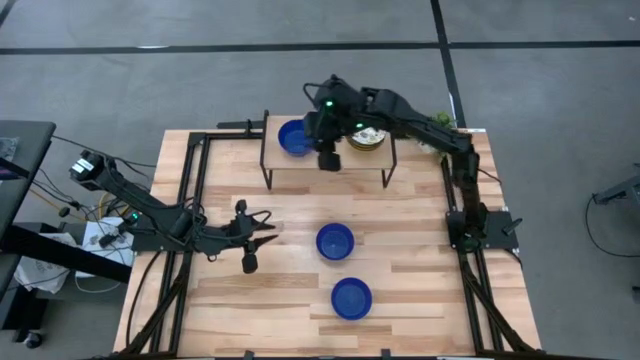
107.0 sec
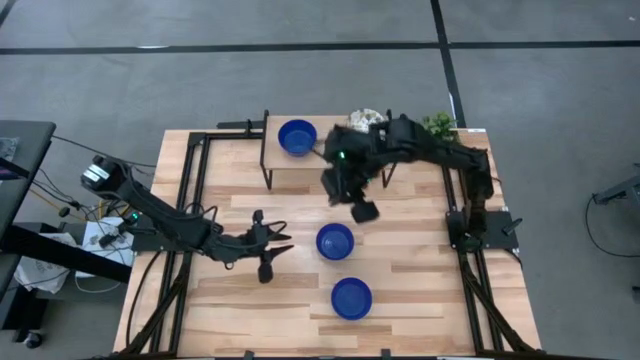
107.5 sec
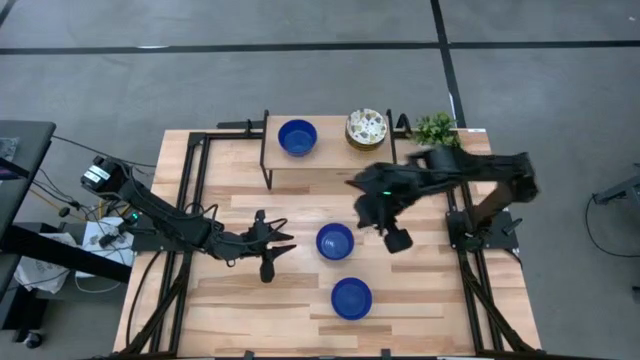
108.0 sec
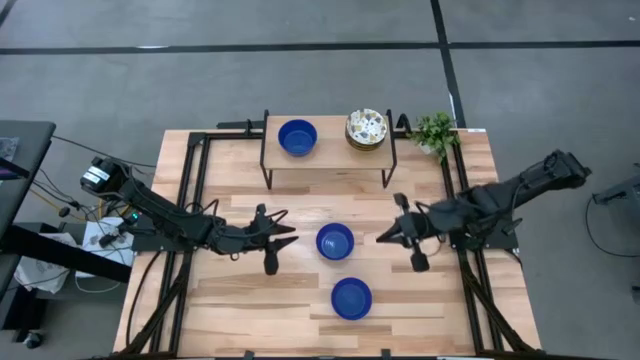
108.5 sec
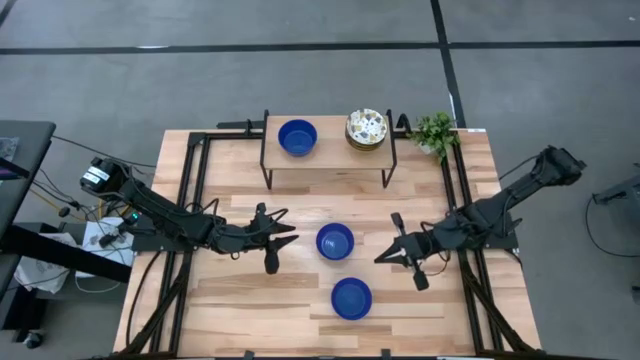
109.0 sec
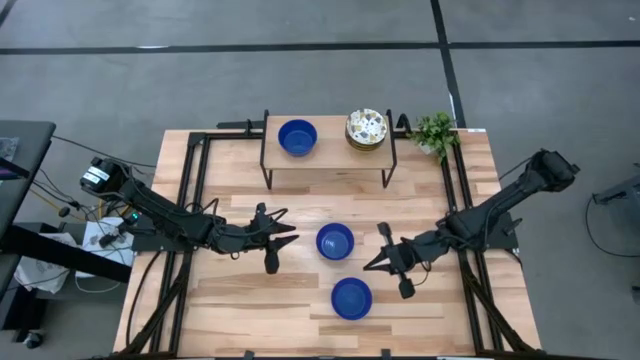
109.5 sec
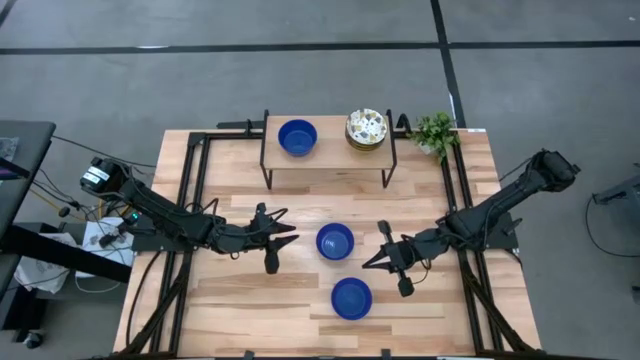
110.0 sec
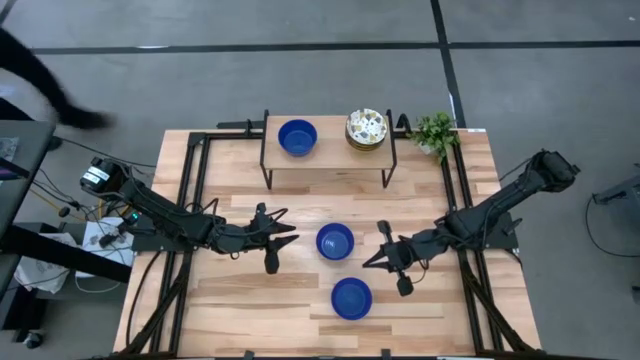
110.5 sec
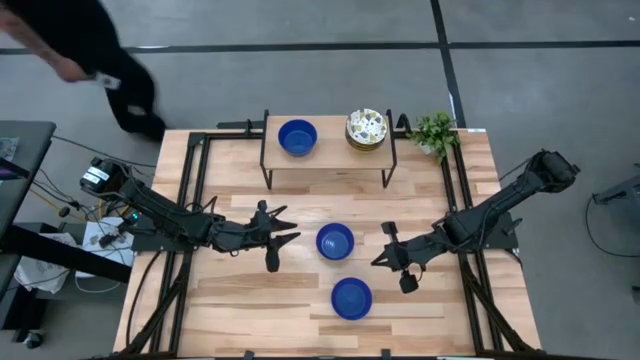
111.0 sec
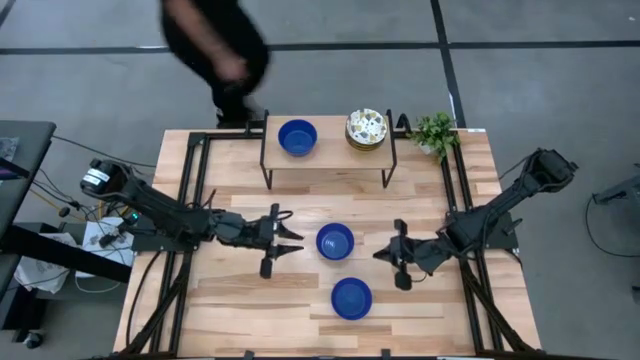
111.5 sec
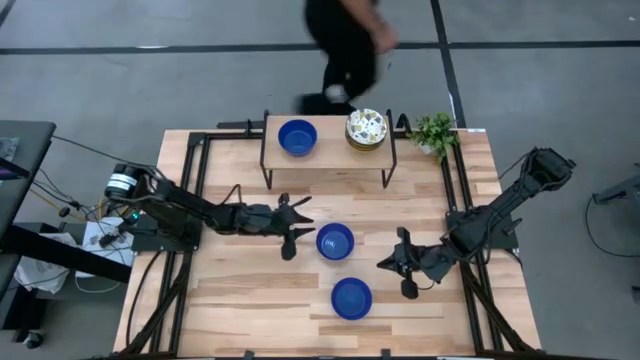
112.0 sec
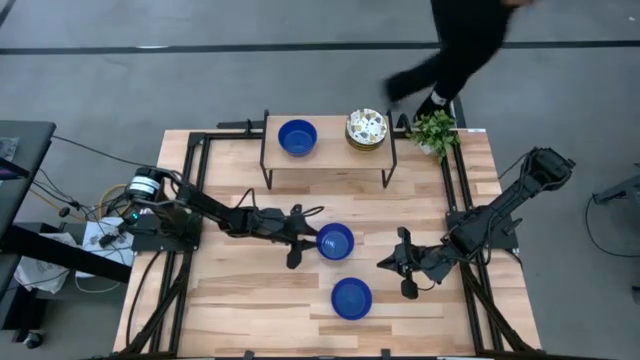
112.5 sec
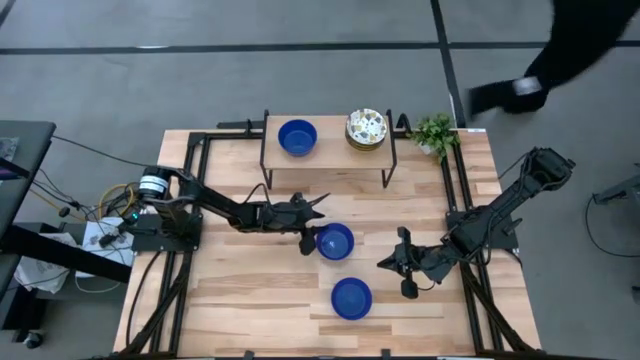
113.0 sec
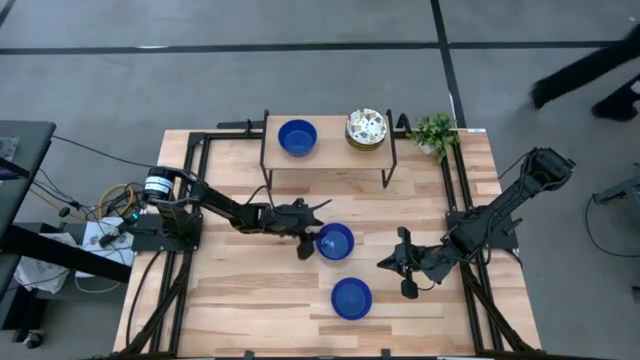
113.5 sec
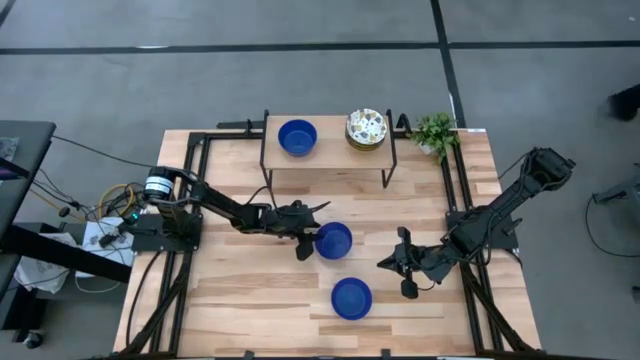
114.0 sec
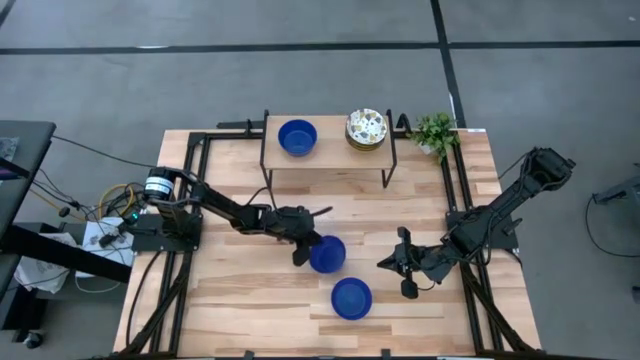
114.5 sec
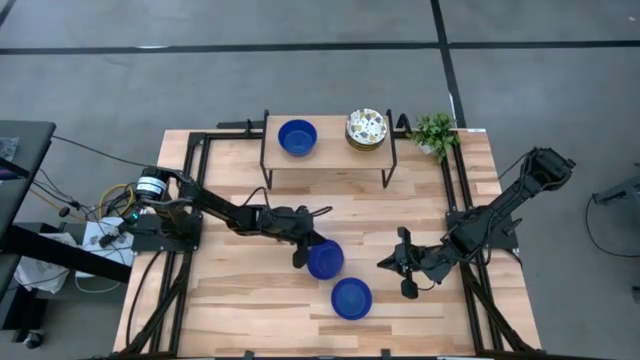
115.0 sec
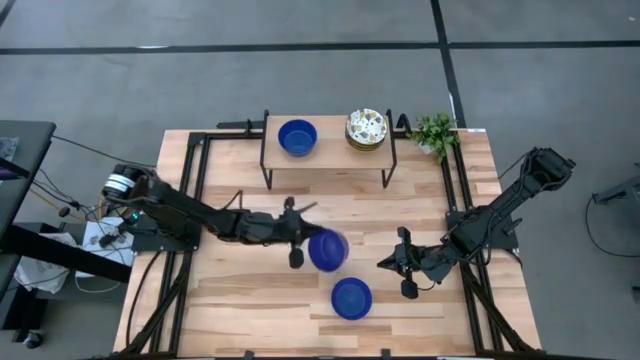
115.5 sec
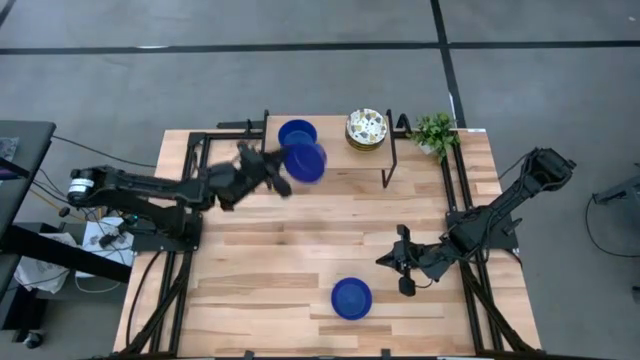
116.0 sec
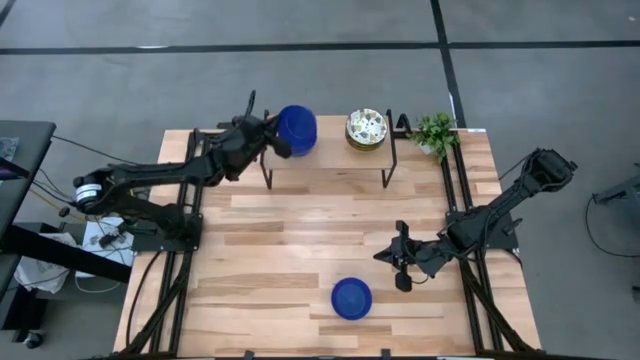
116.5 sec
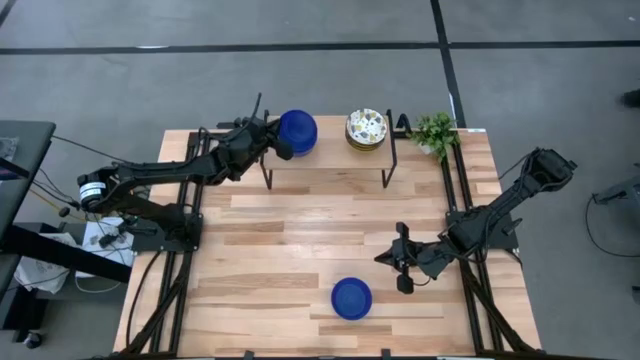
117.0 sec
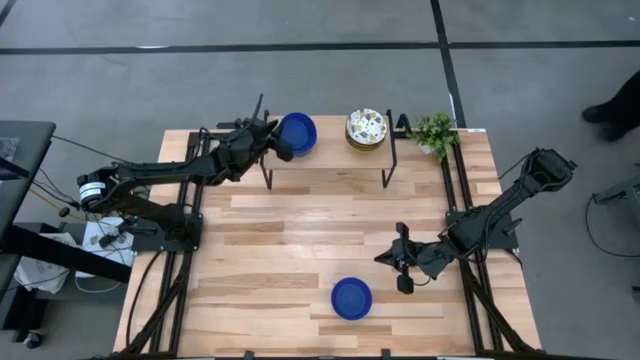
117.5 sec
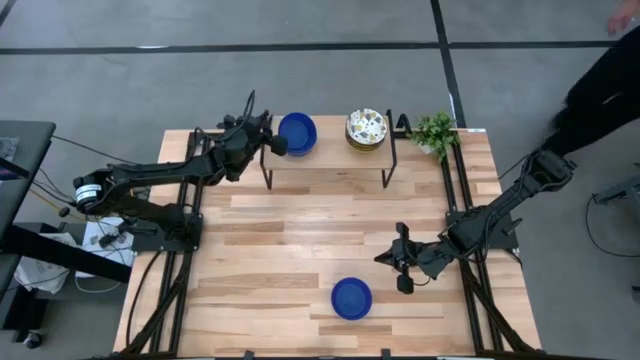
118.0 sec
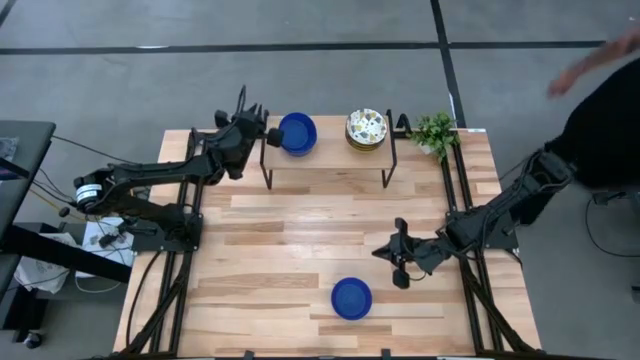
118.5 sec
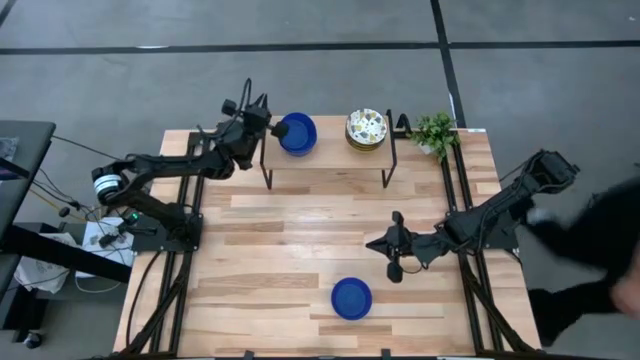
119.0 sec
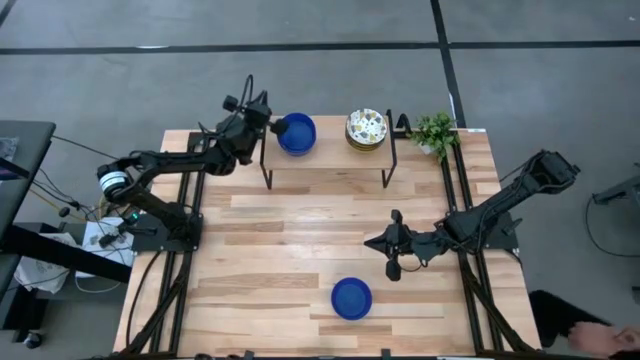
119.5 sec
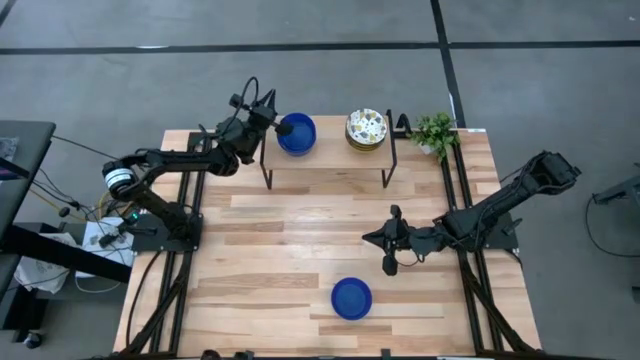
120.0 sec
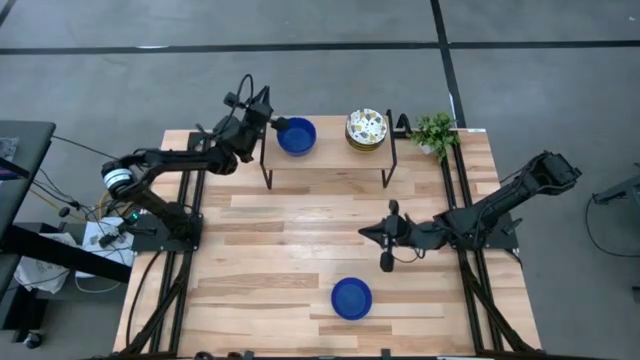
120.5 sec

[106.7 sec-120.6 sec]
Task: Pick & Place Mini bowls
Stack the blue bowl on top of the blue bowl on the shelf

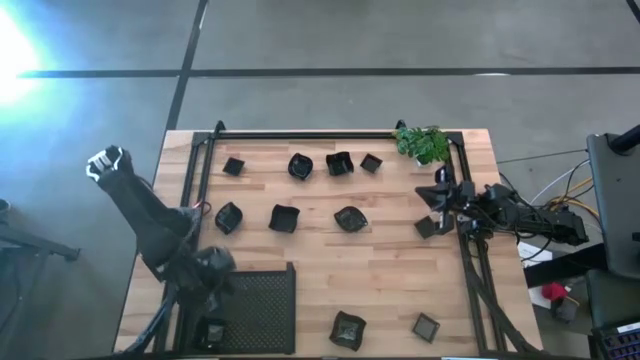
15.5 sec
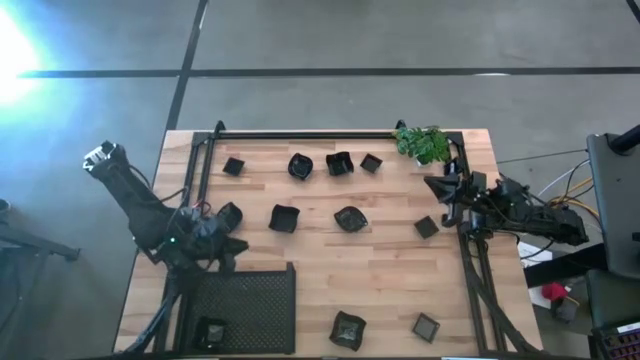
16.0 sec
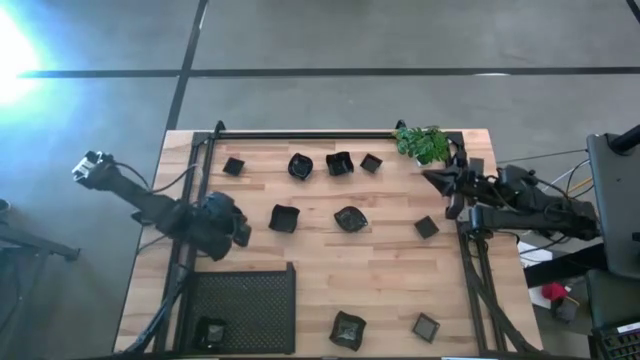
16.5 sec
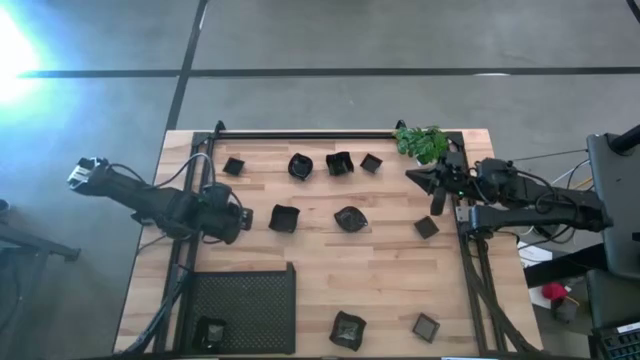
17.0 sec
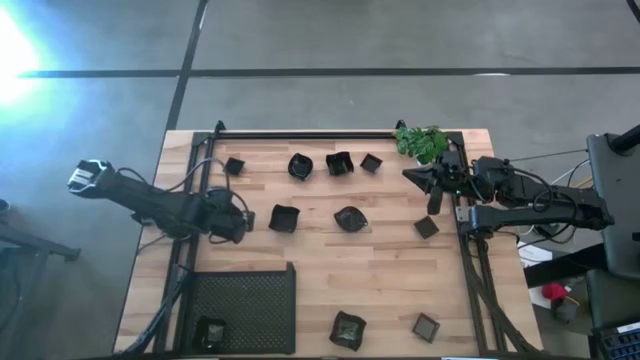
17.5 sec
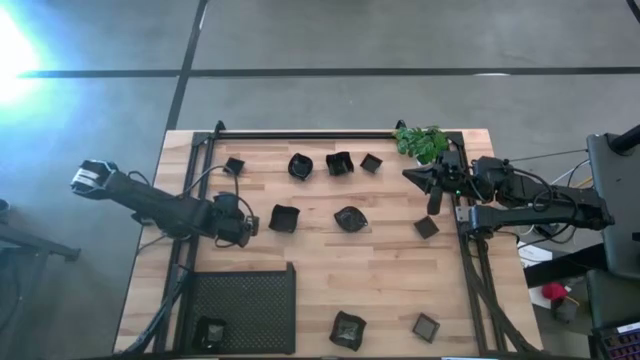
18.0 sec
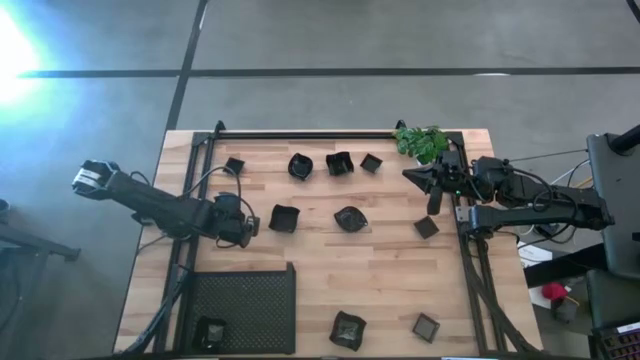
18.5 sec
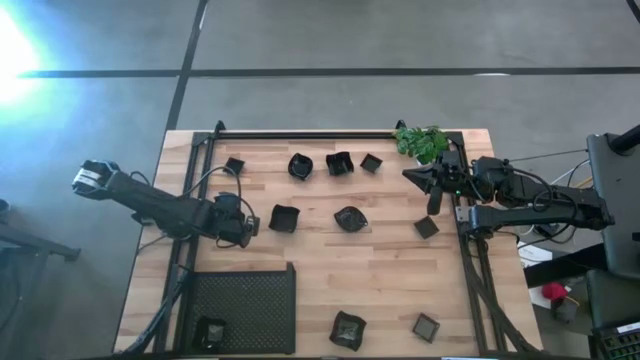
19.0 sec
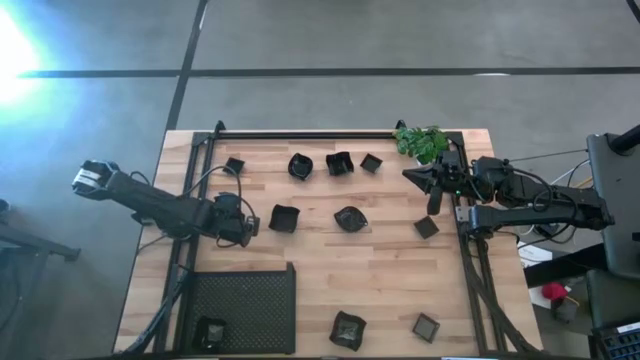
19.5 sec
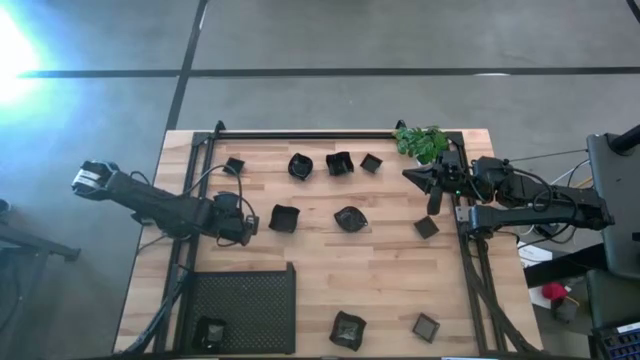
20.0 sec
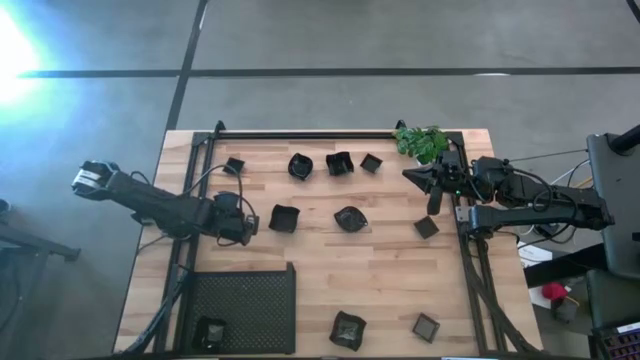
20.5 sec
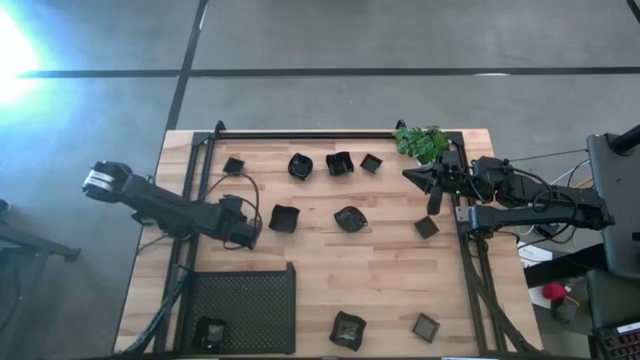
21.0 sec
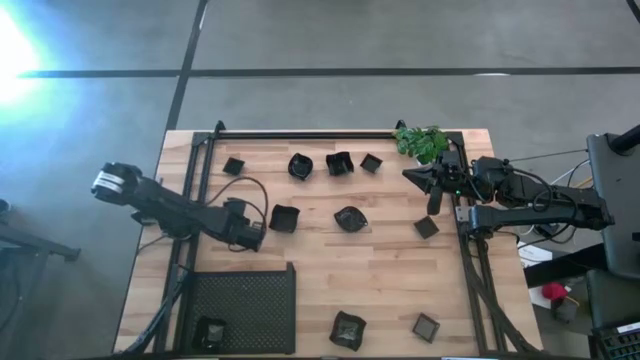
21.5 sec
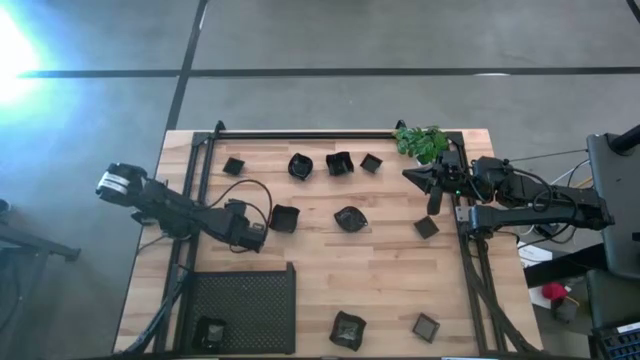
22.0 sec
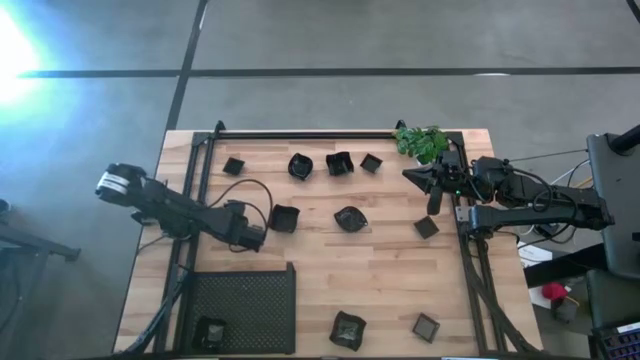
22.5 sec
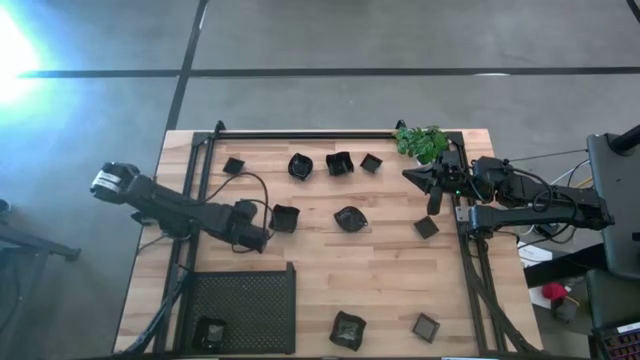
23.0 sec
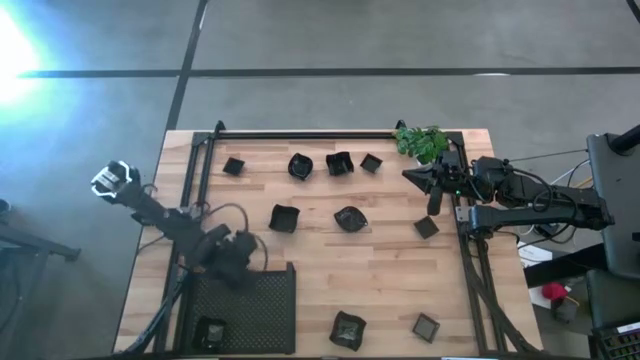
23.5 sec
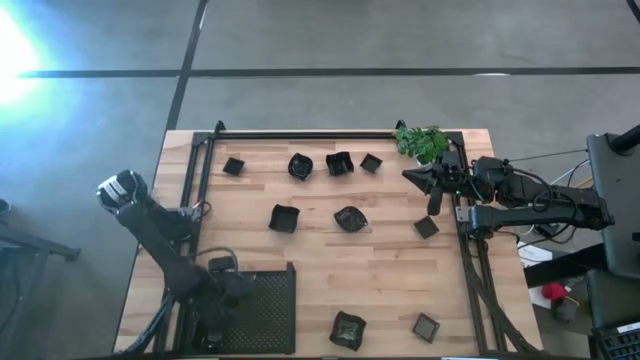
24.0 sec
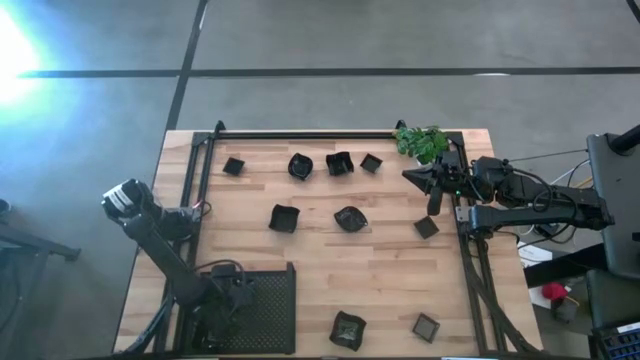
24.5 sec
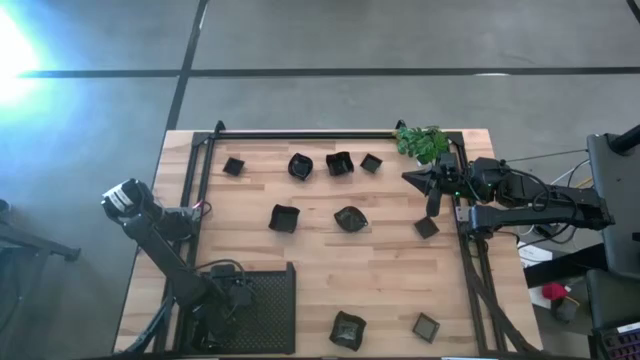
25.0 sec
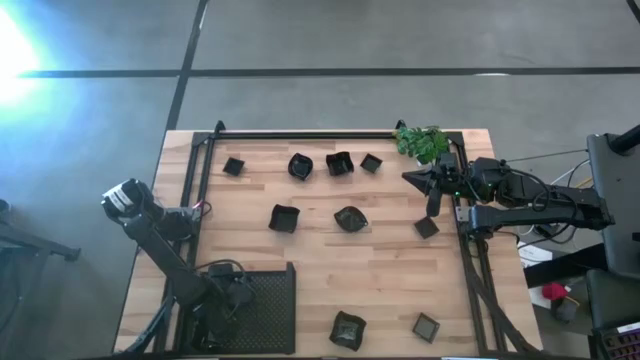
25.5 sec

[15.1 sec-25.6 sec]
Task: Pick & Place Mini shaped plates
Put the black leaf-shaped plate on the shelf
